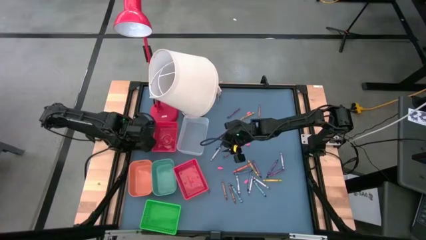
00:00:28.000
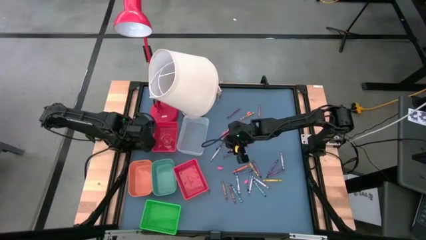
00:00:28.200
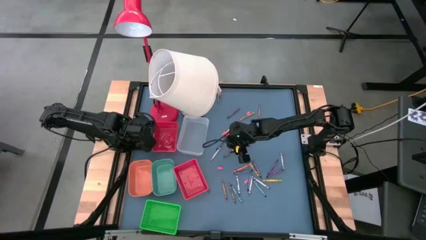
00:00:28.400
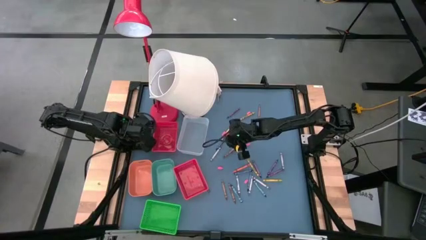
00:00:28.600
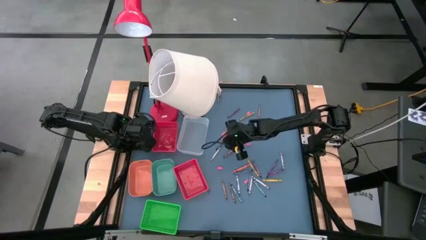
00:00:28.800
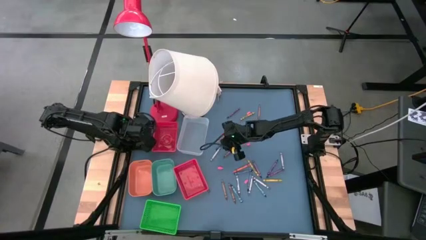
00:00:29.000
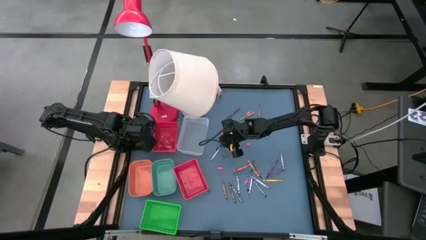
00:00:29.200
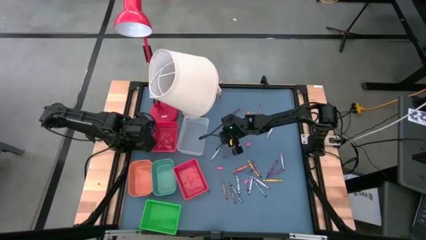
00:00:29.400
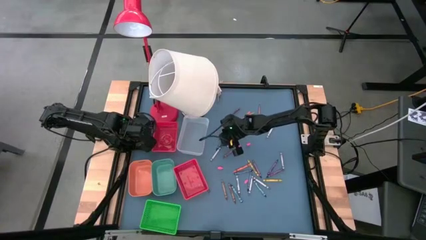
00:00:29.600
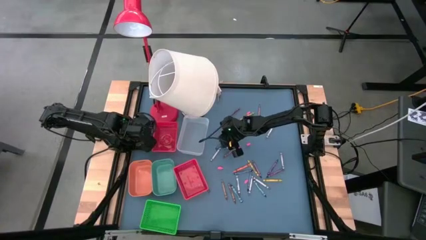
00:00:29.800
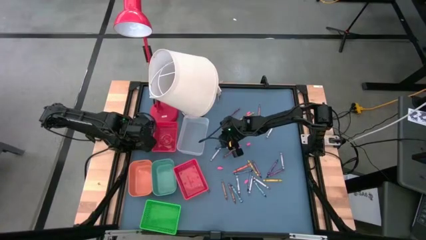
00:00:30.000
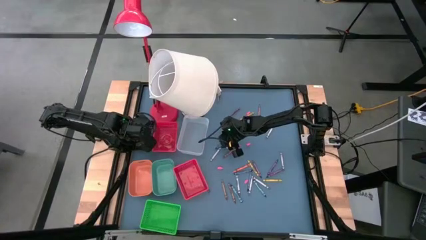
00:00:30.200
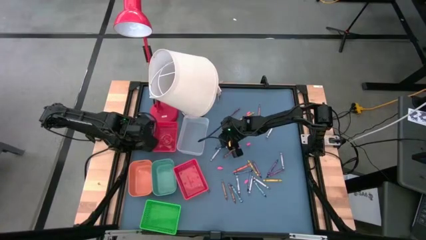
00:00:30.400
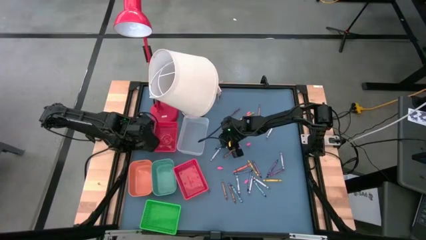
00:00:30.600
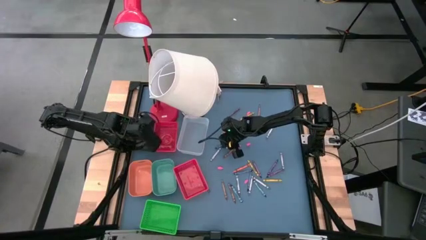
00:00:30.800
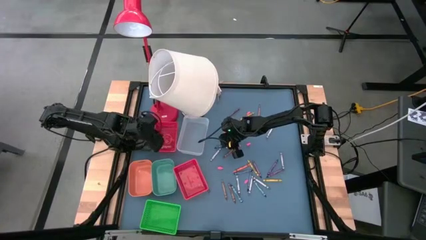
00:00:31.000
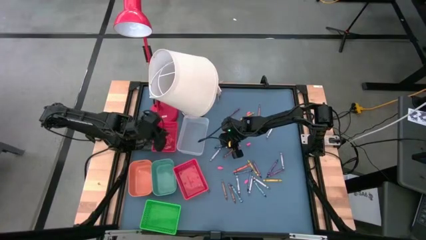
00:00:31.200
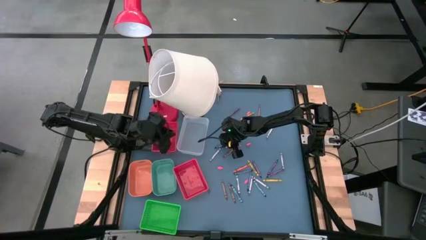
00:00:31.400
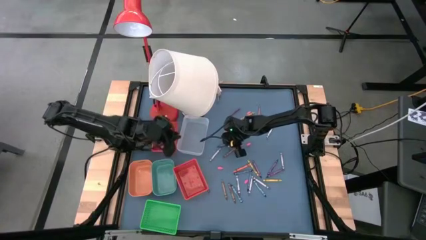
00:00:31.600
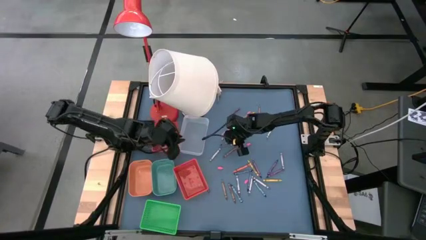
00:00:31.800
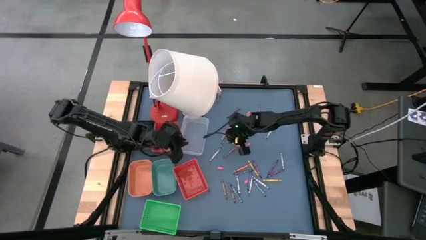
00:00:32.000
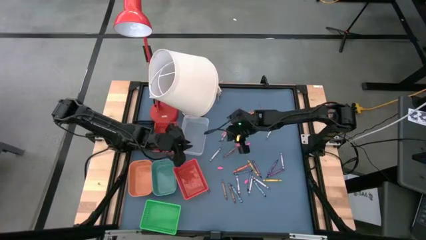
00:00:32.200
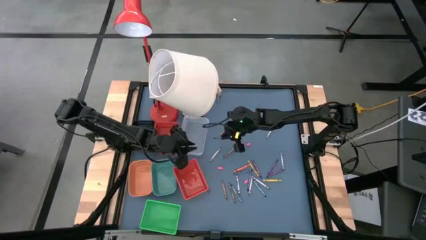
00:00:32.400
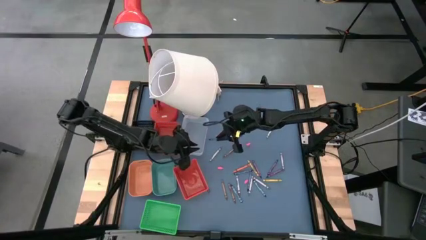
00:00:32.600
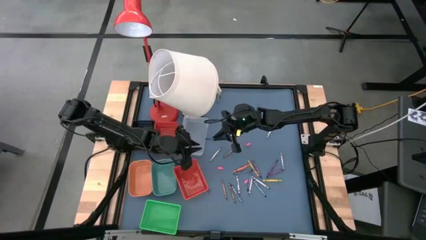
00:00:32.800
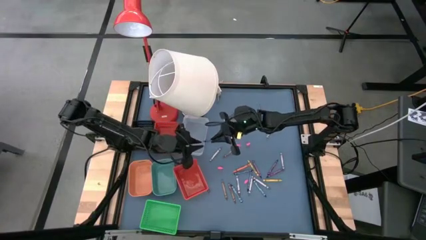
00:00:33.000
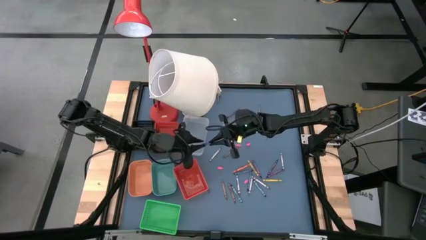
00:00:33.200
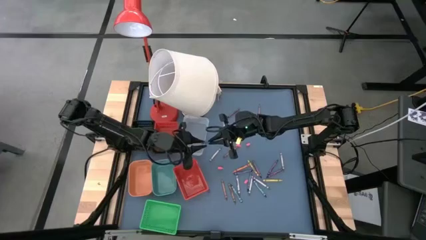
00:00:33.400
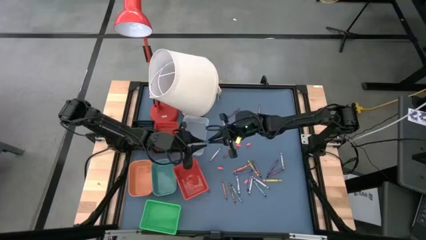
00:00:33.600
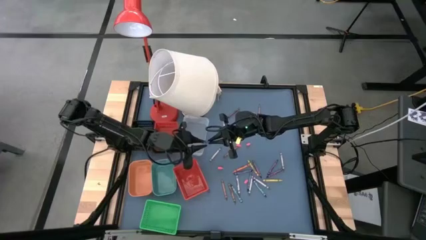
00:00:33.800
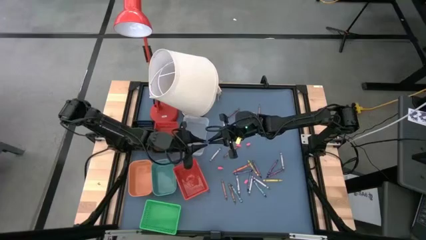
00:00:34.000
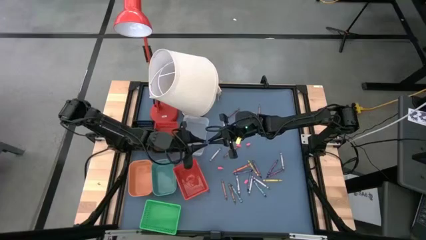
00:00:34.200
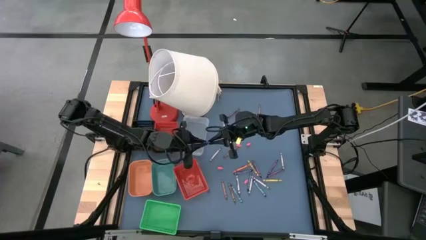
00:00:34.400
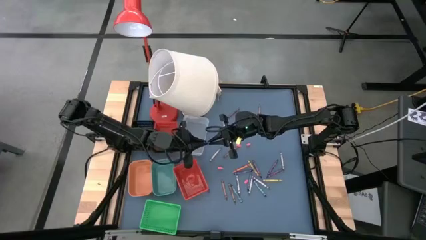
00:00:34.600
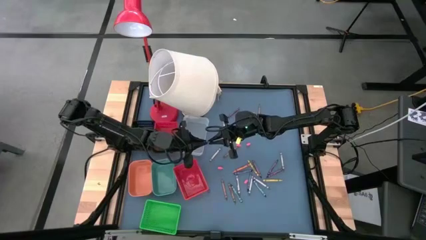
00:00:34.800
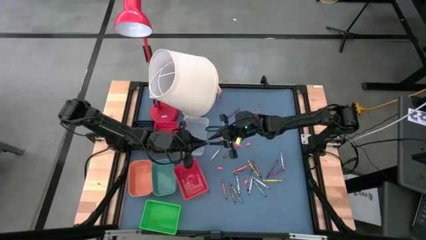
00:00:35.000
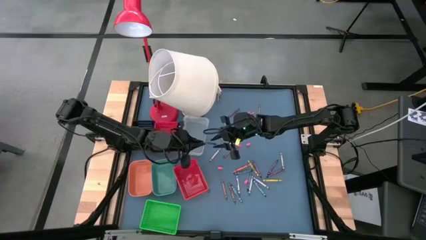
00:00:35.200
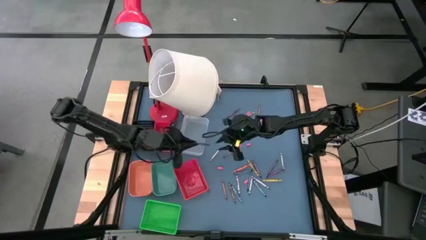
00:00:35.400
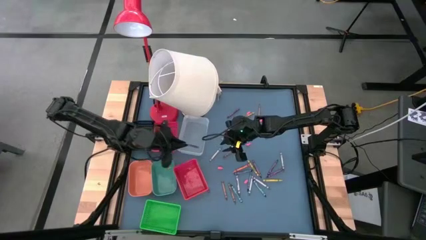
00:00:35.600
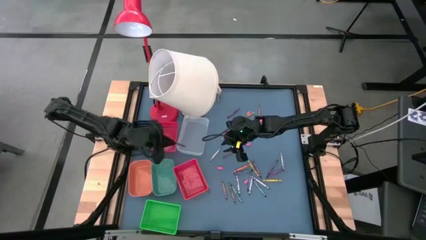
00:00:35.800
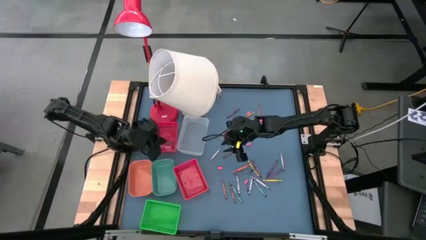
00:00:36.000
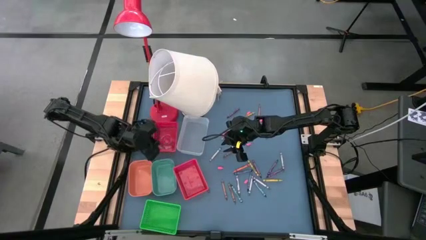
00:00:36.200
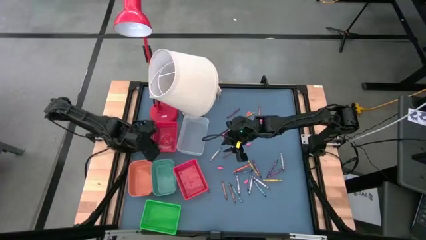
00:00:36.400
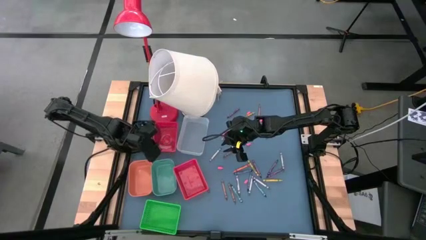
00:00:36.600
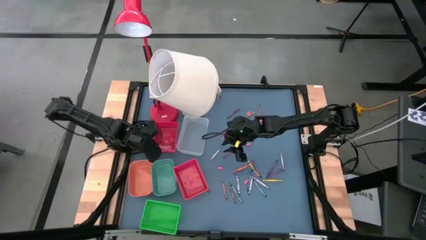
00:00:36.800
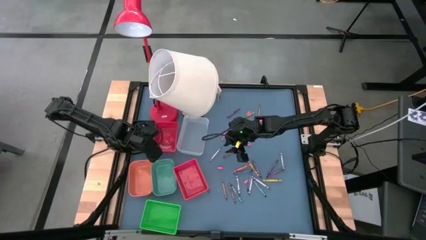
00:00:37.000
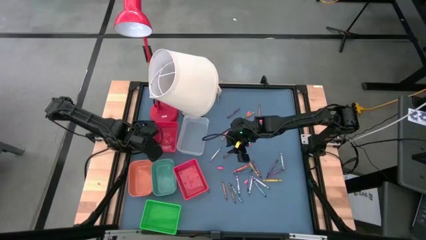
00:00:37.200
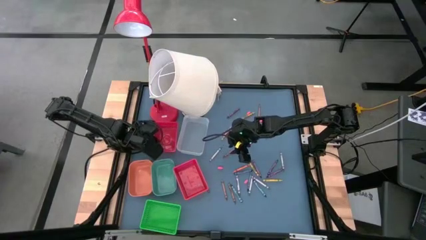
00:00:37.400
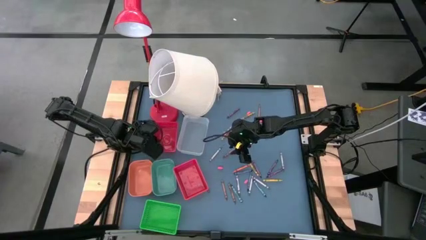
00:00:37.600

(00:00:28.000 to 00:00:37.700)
Task: Sort crayons
Put the blue crayon into the top red bin
